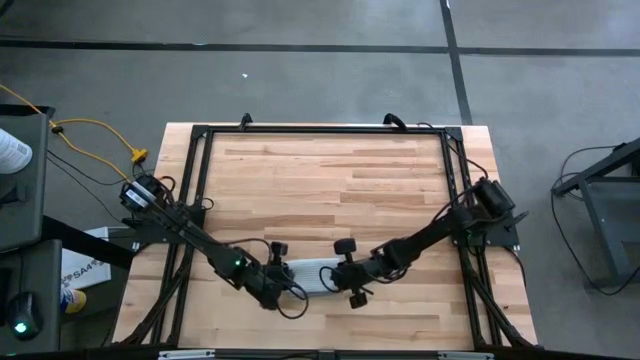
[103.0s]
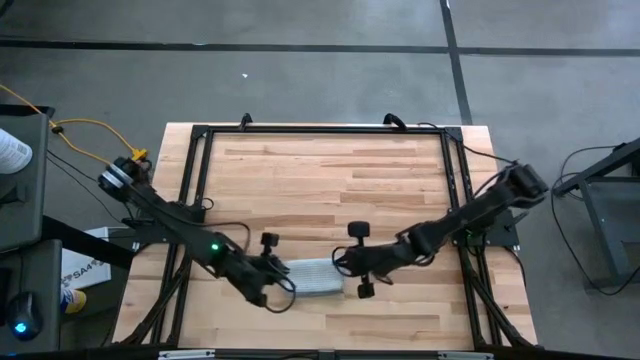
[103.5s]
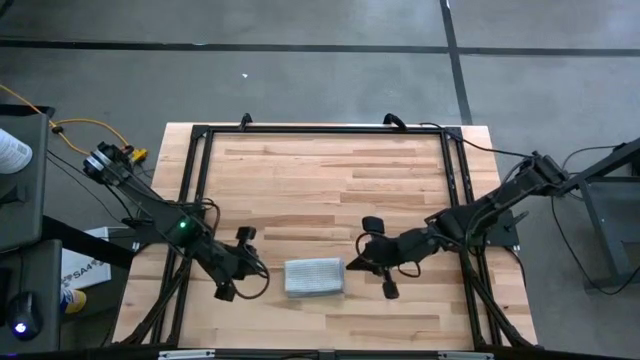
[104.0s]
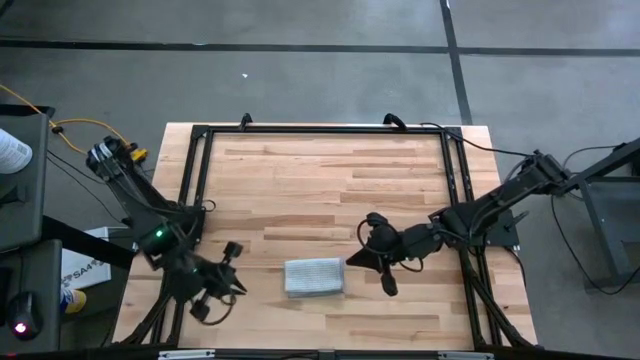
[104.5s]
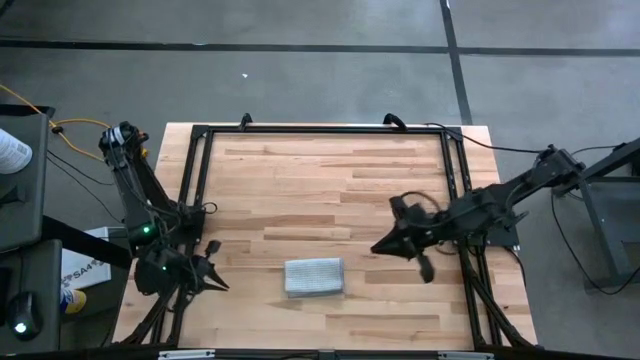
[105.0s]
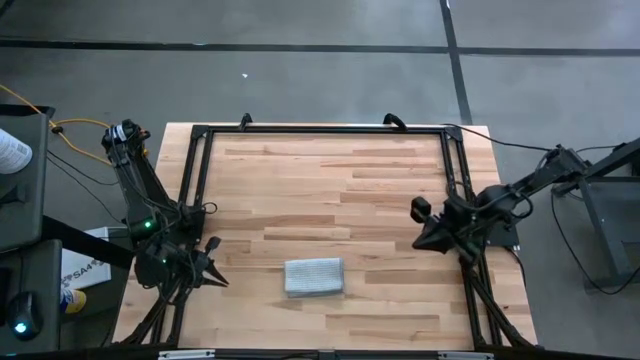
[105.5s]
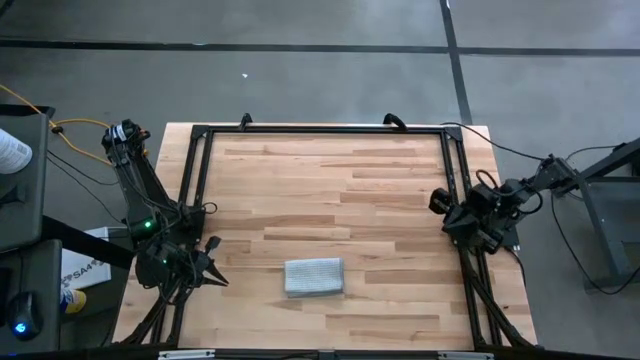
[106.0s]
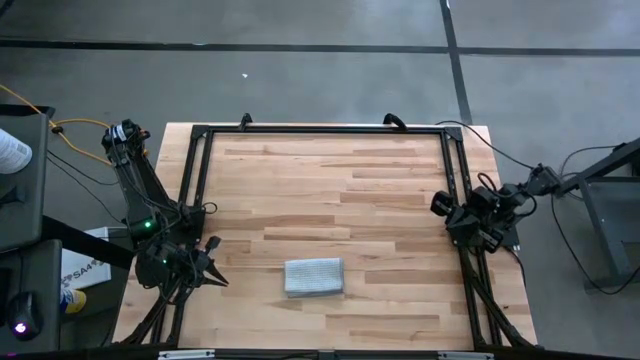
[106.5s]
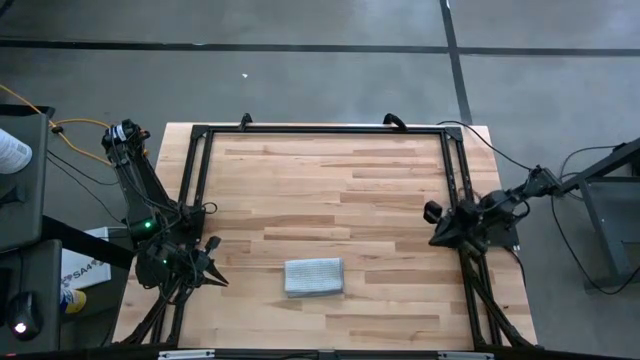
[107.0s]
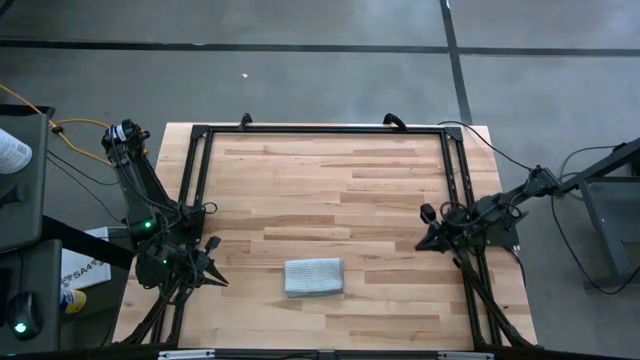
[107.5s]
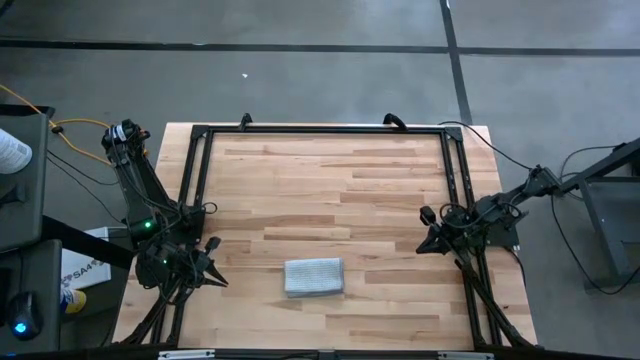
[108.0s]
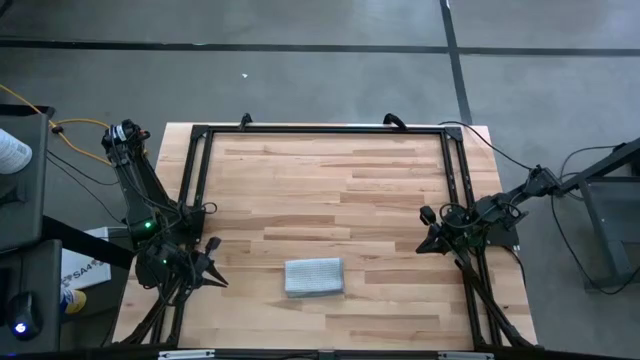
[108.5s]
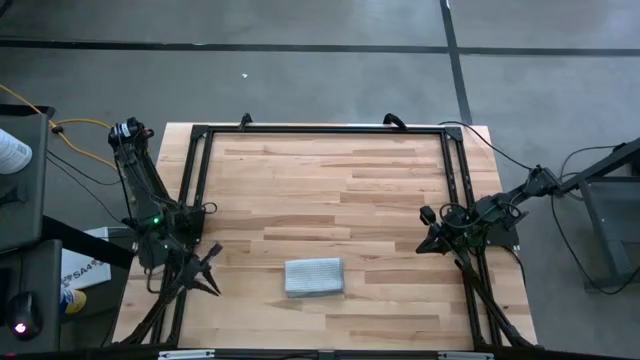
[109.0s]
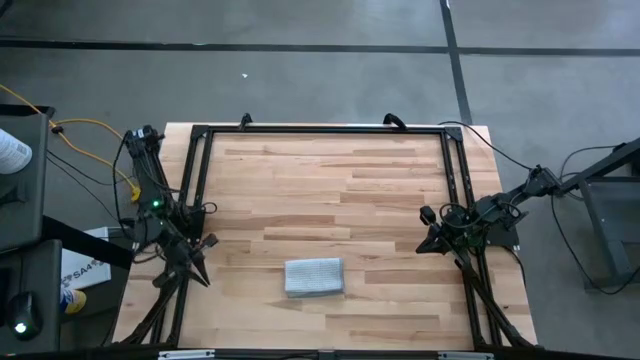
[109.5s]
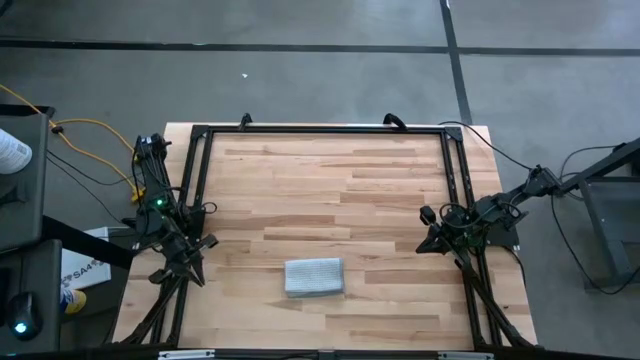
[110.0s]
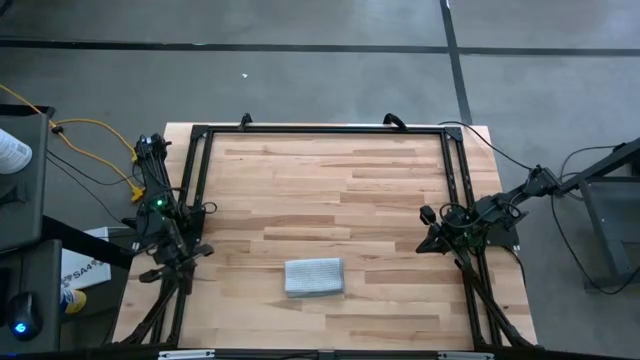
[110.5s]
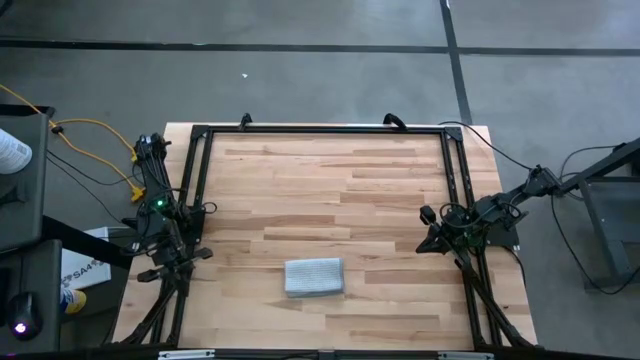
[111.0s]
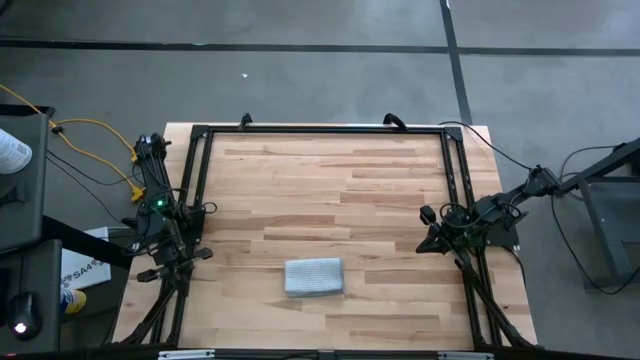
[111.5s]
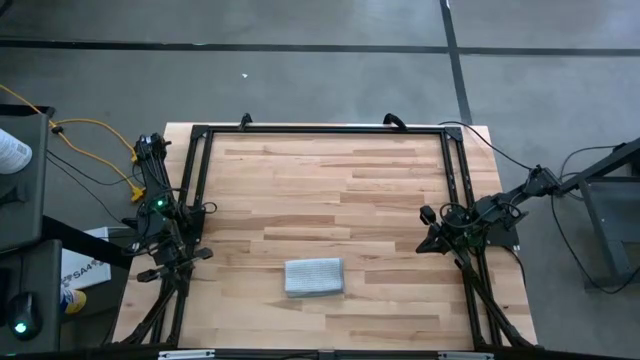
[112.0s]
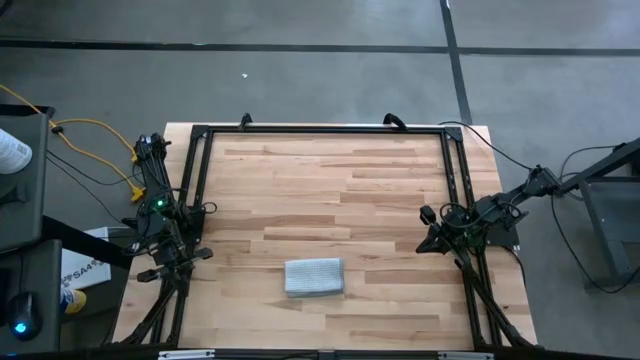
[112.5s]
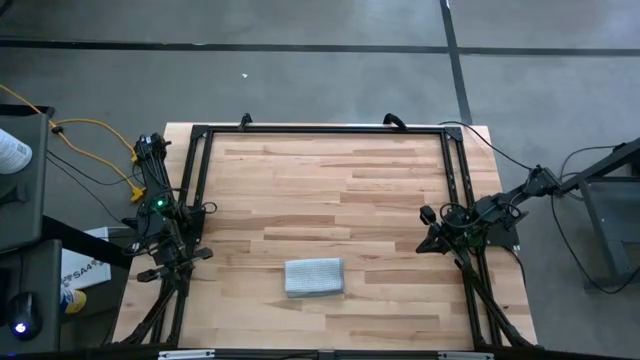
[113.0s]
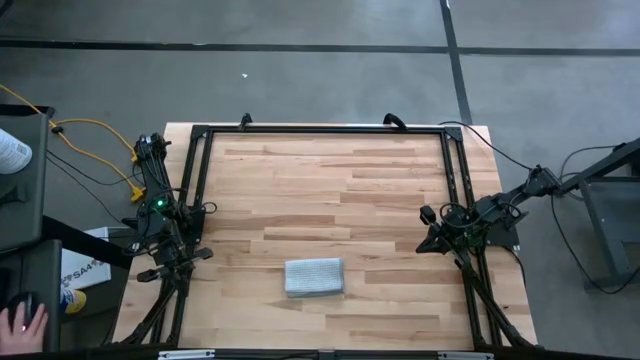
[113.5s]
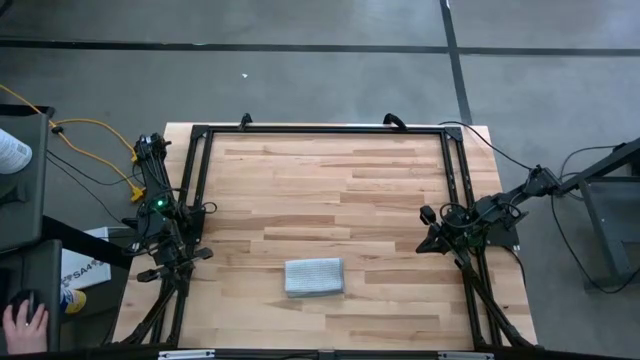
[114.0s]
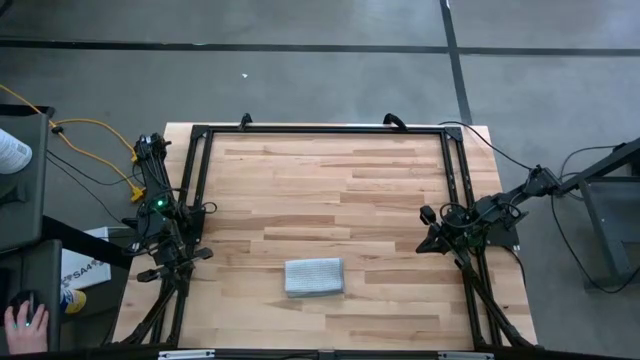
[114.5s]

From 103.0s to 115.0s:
Task: Fold microfiber towels
Return to Home Position

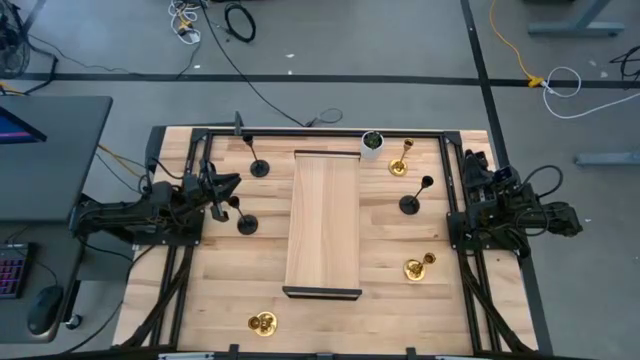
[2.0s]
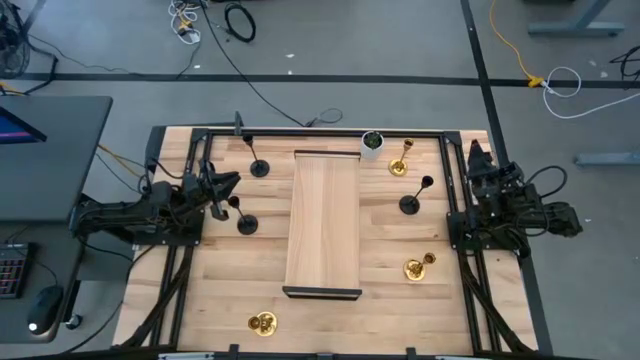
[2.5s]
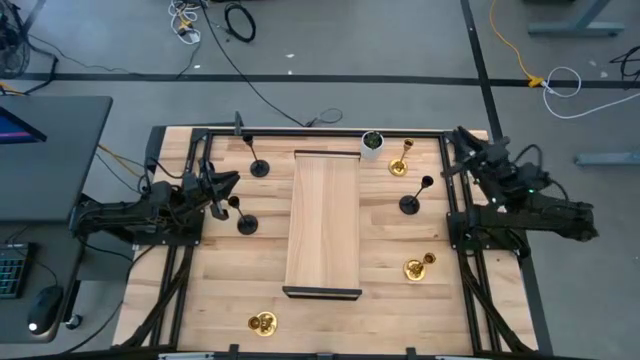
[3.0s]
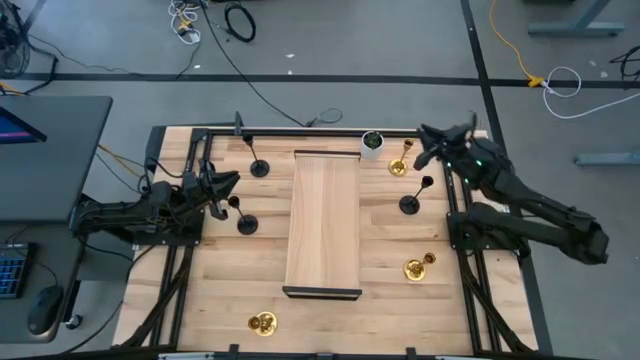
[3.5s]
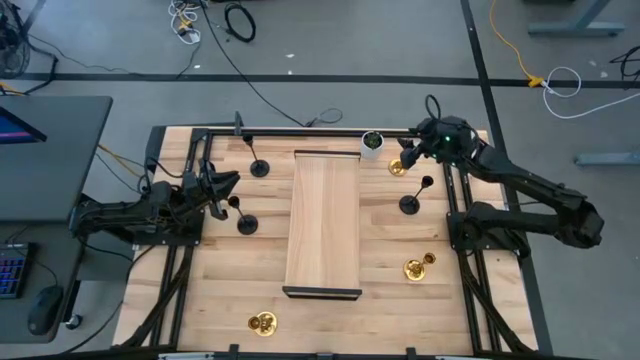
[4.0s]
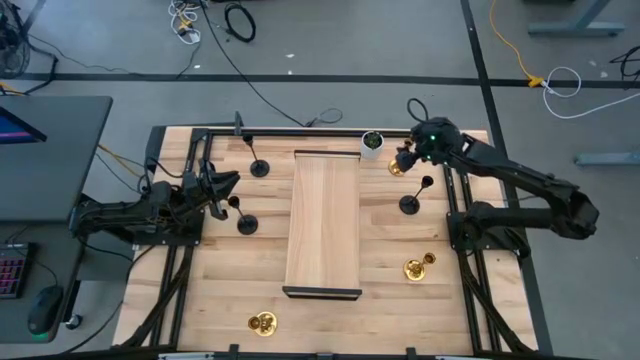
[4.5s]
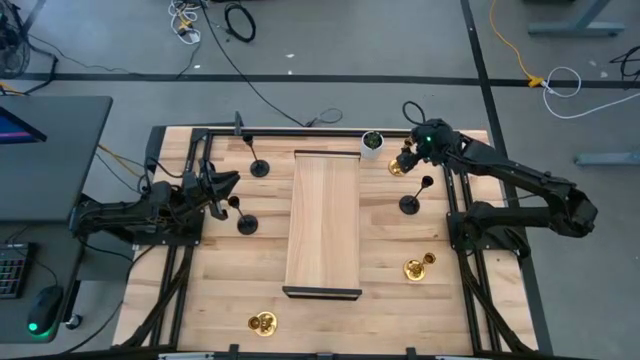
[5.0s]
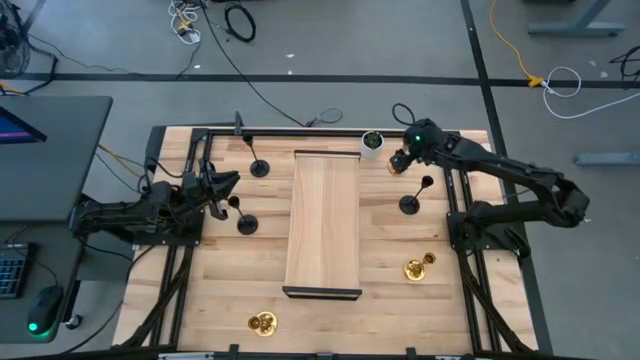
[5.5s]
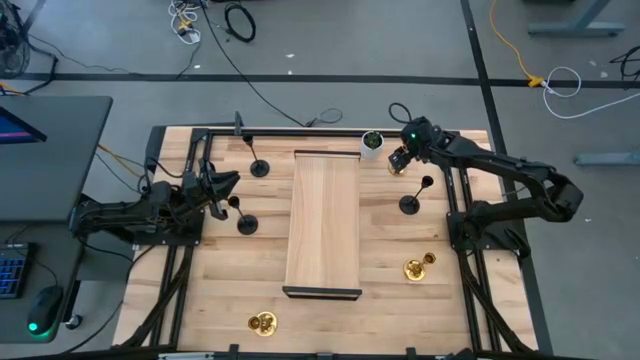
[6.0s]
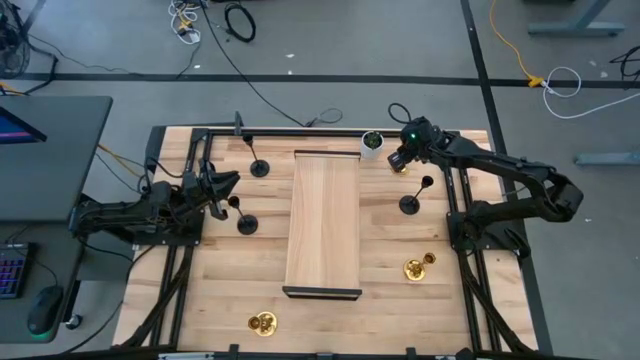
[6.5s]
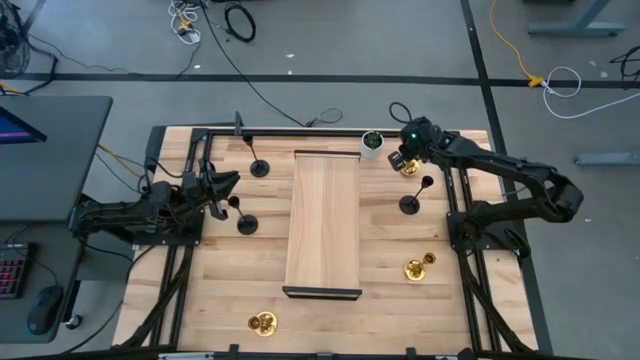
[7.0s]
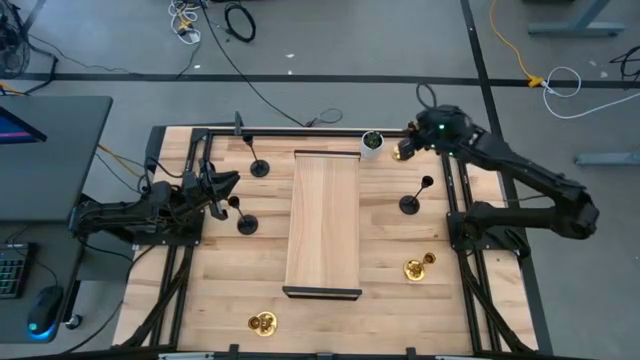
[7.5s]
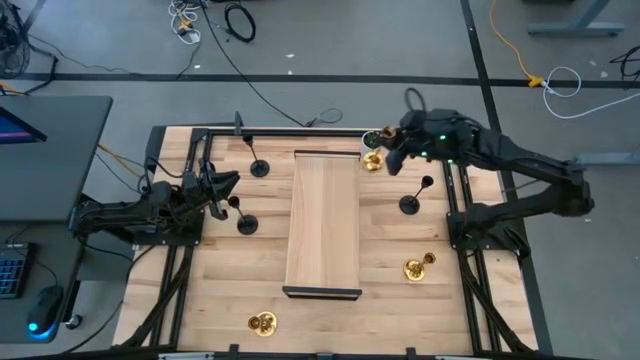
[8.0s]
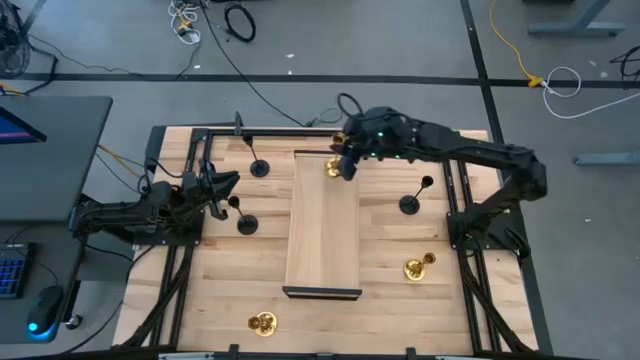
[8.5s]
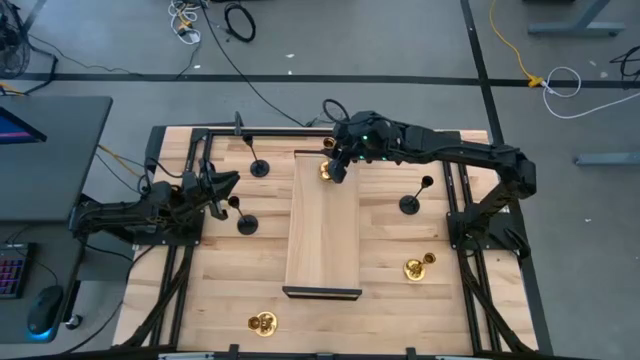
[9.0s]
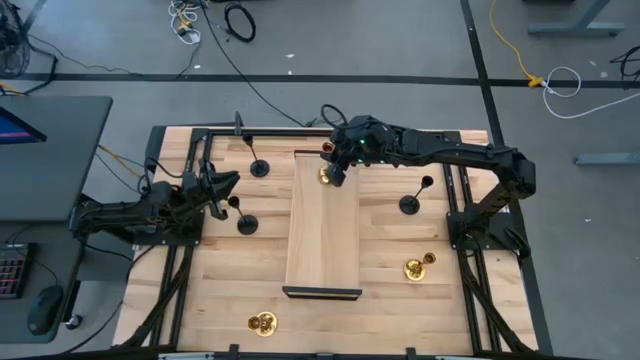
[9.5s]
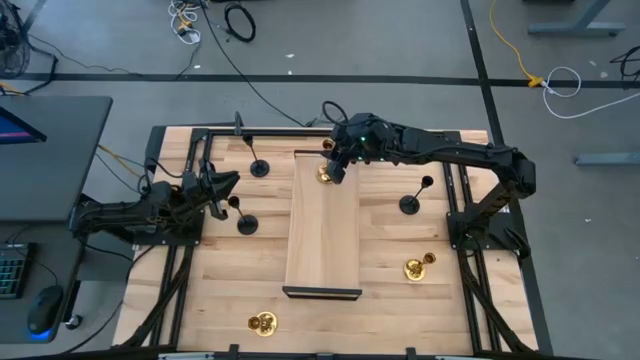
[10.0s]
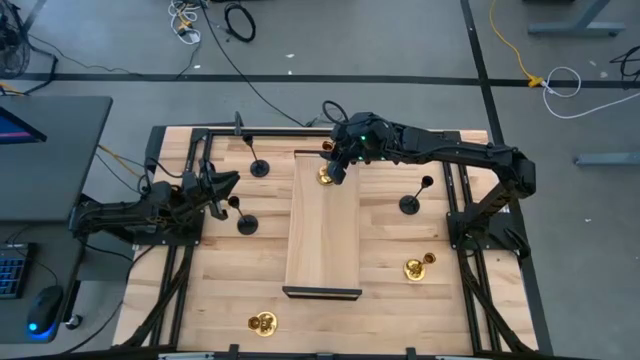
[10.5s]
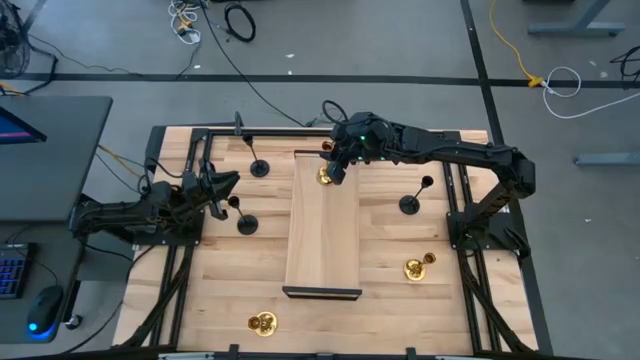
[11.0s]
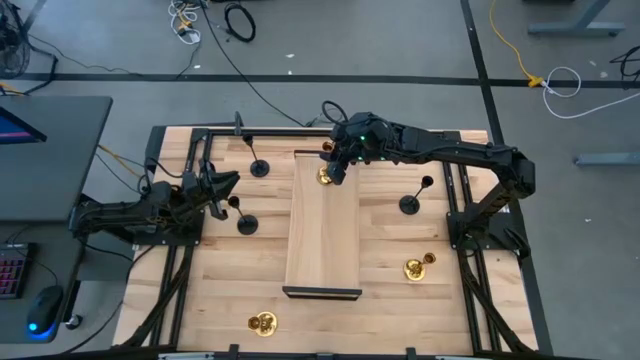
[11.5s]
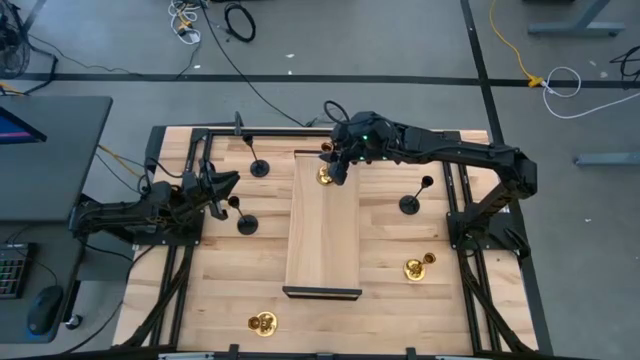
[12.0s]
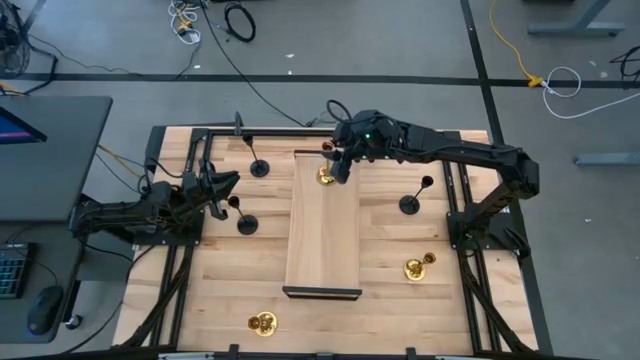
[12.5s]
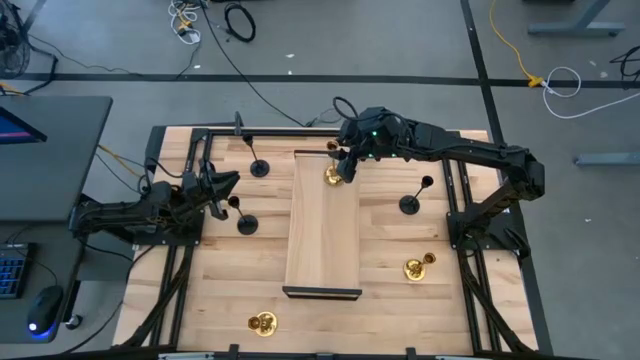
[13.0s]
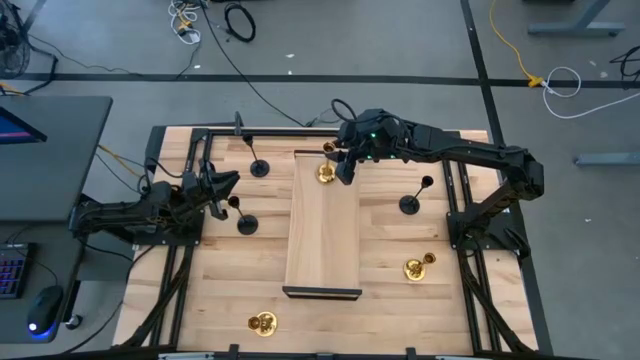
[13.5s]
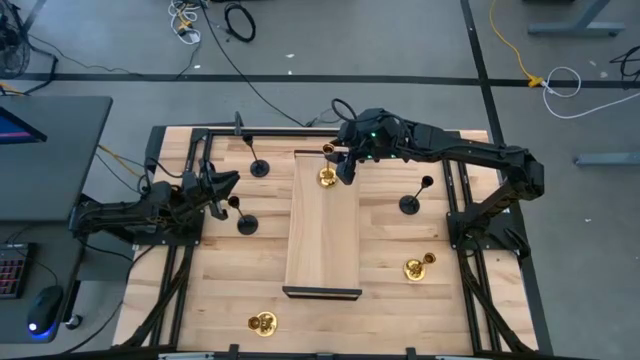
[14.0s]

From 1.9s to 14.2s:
Task: Pick & Place candle stick holders
Put the top right golden candle holder on the shelf
